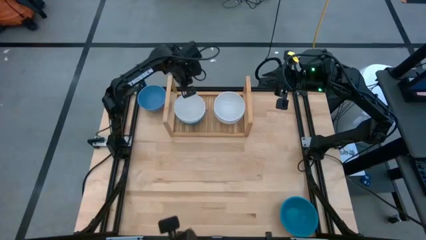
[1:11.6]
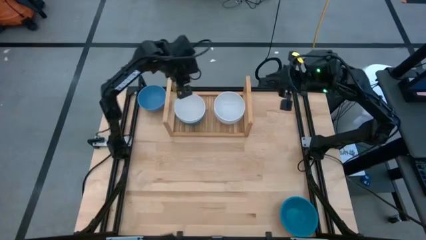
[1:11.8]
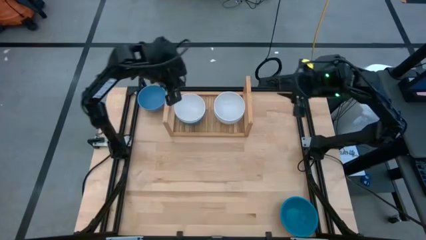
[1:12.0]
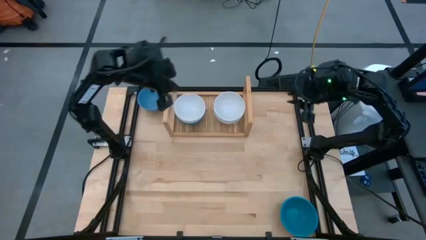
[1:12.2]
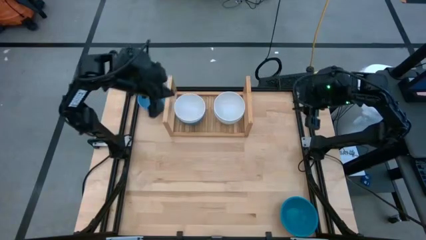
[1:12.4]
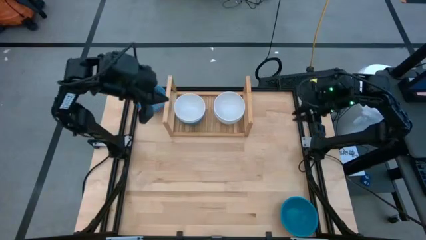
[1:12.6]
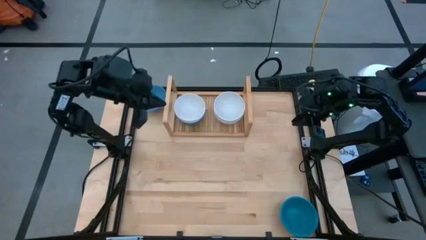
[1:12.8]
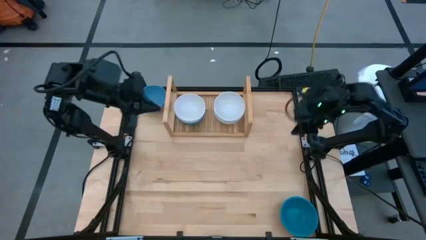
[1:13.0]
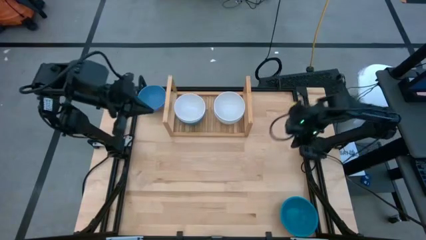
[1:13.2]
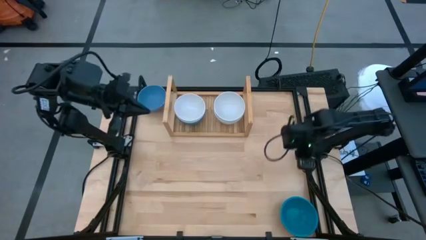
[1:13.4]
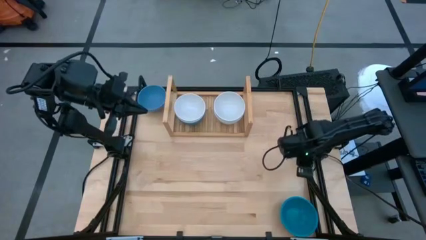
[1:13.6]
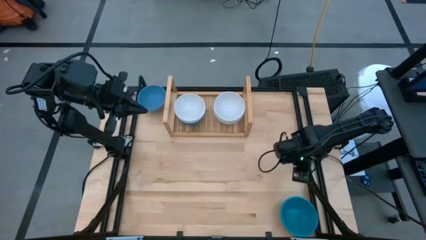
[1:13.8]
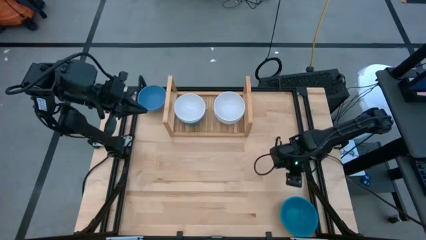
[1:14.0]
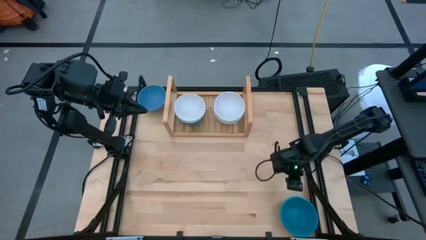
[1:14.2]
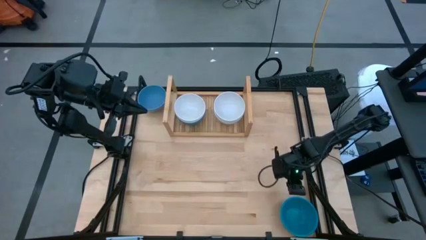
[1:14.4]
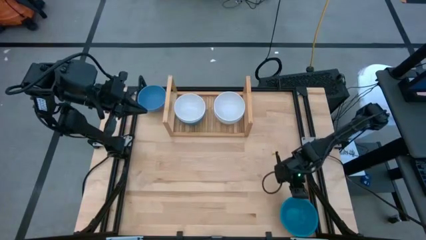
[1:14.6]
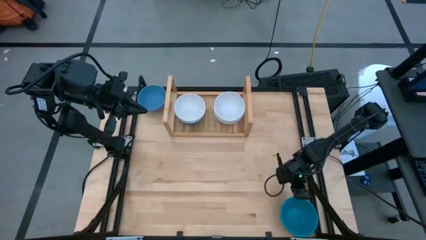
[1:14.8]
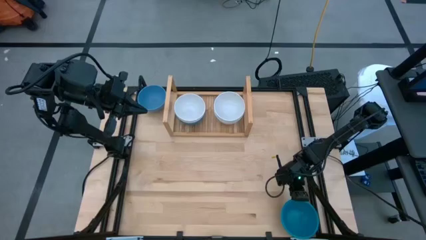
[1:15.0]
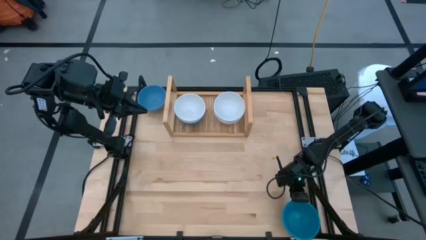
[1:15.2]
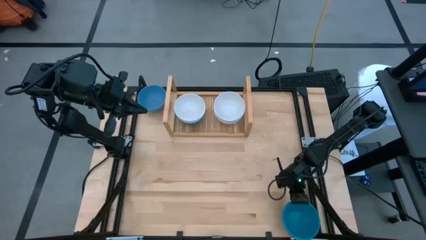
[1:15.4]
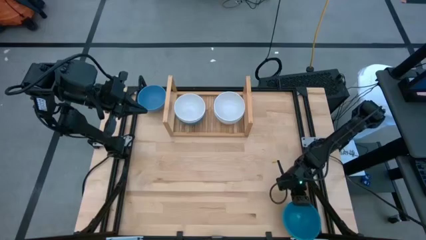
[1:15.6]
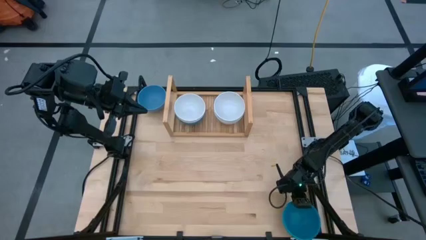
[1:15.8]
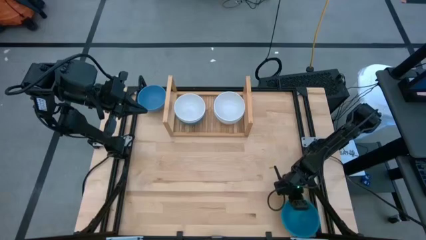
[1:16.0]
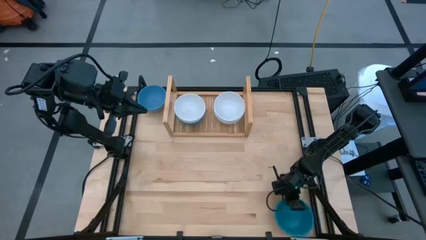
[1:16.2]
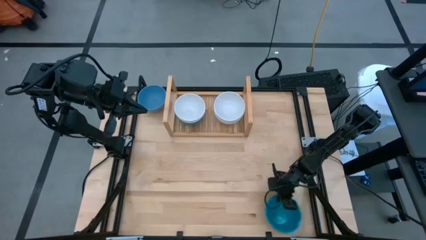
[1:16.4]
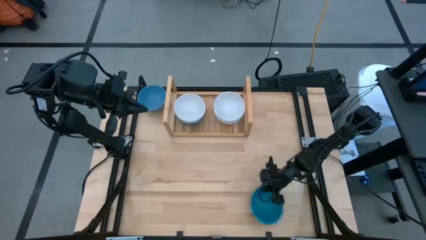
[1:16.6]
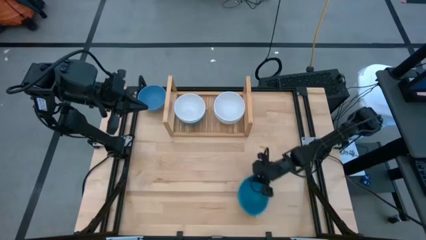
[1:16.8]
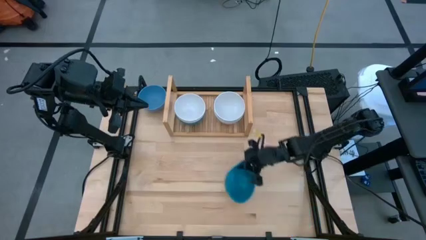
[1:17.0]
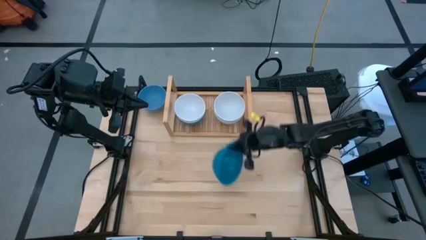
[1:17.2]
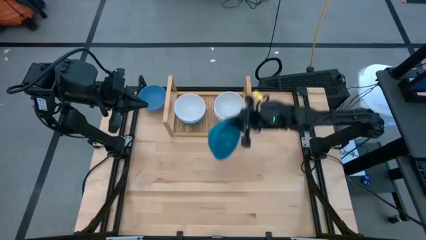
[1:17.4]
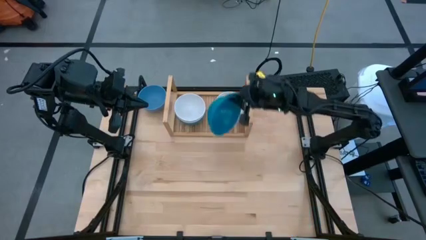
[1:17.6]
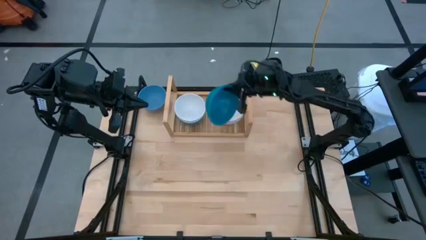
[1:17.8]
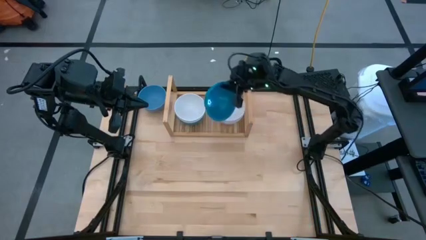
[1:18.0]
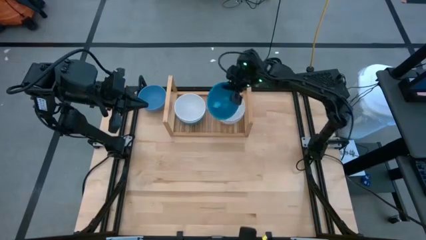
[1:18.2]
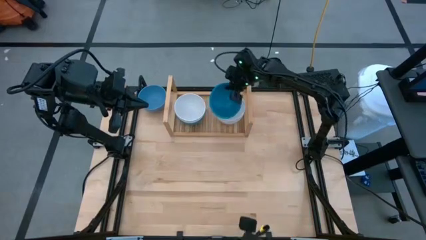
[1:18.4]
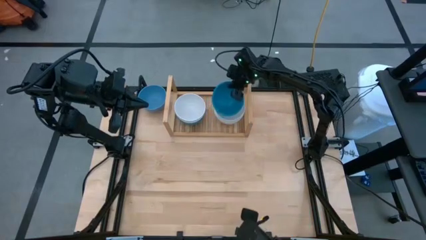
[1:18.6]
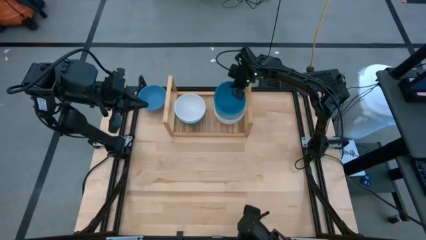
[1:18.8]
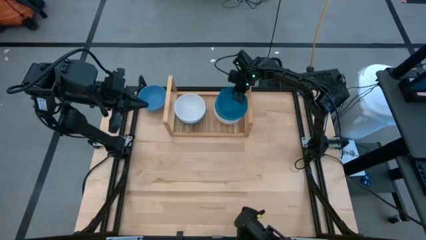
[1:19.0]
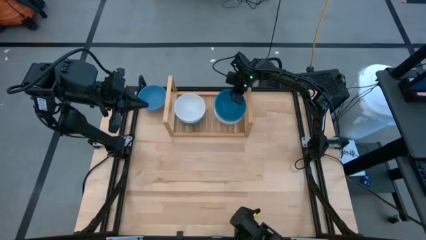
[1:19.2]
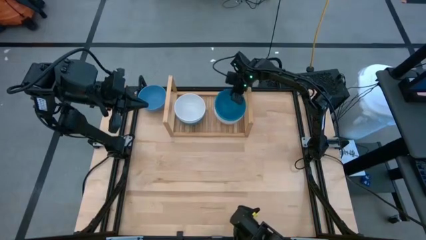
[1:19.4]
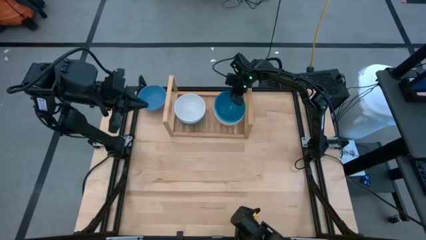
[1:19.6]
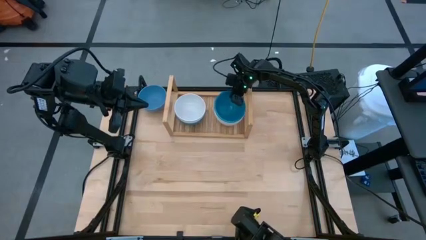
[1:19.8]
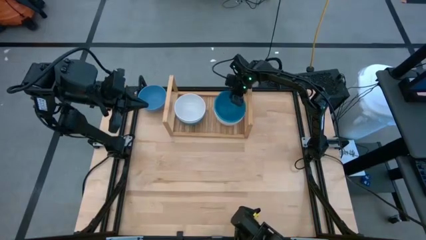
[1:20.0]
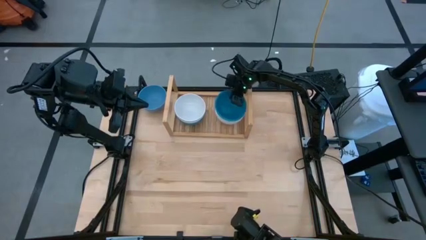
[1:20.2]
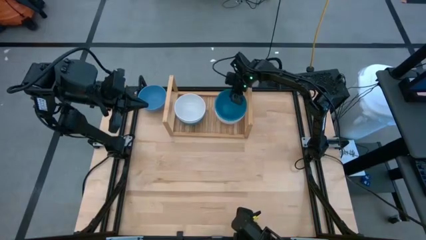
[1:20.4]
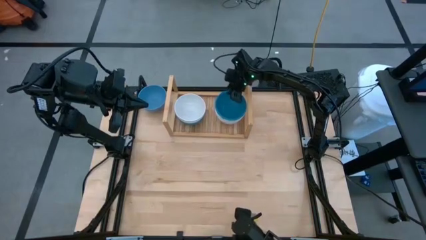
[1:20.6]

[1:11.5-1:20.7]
Task: Place and stack bowls onto a shelf
Stack the bottom blue bowl on top of the white bowl on the shelf

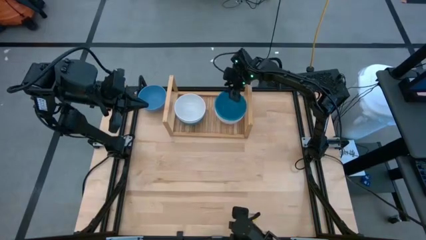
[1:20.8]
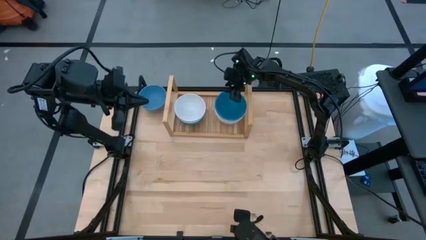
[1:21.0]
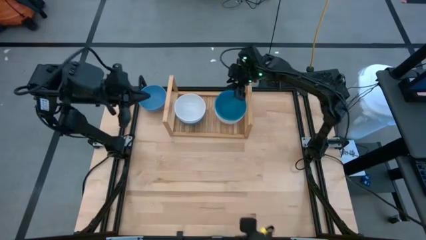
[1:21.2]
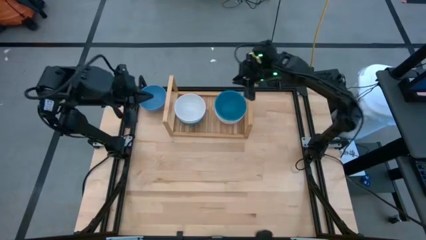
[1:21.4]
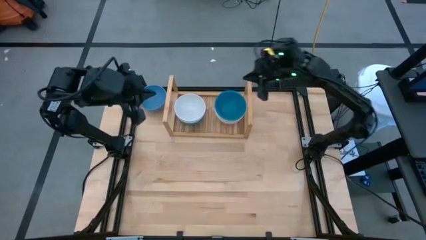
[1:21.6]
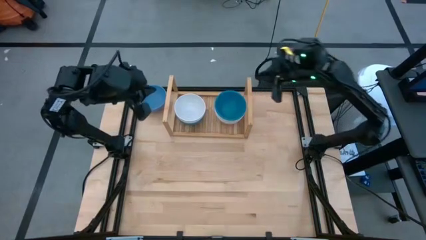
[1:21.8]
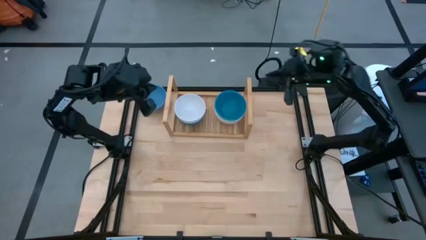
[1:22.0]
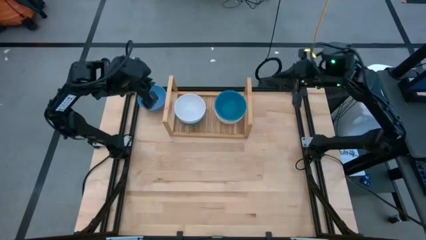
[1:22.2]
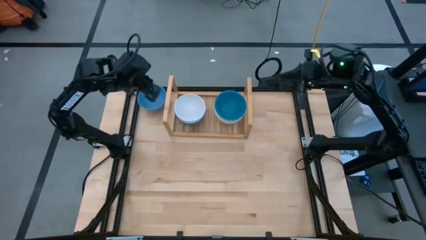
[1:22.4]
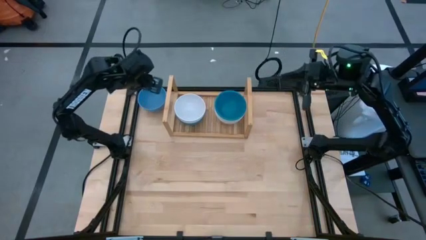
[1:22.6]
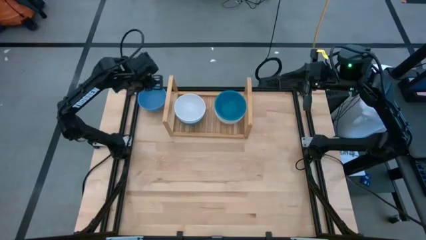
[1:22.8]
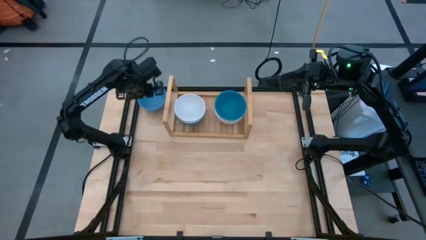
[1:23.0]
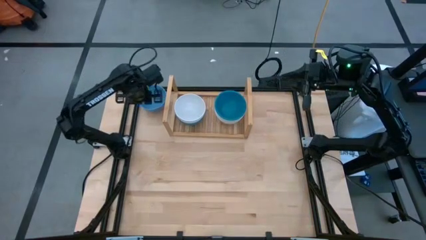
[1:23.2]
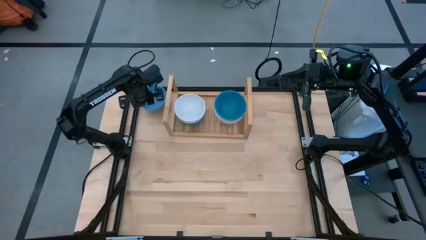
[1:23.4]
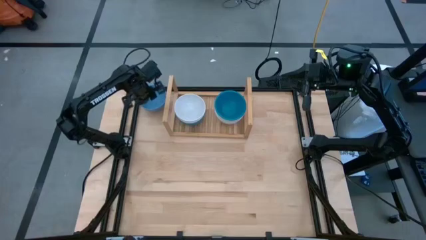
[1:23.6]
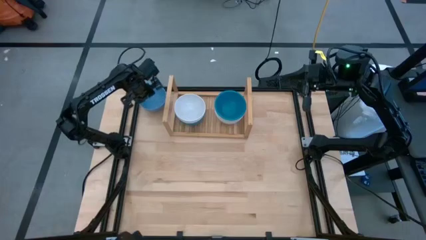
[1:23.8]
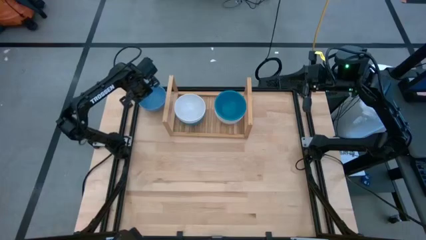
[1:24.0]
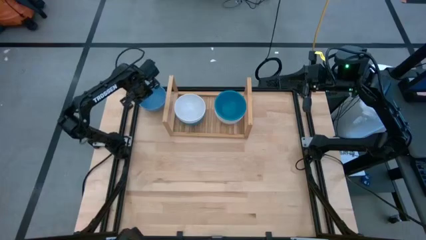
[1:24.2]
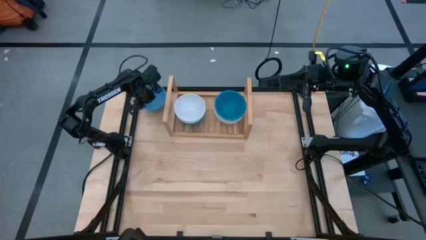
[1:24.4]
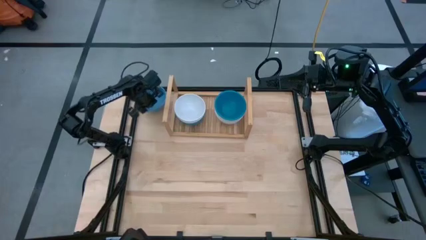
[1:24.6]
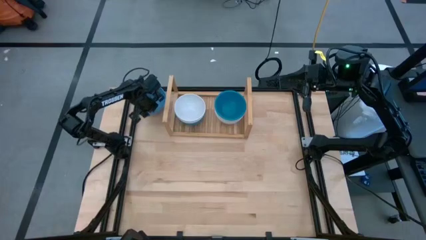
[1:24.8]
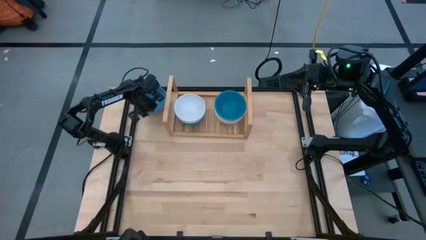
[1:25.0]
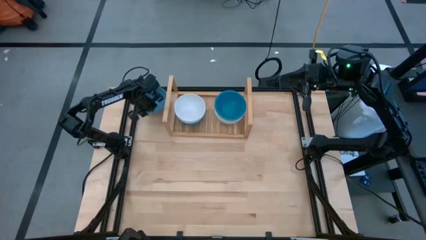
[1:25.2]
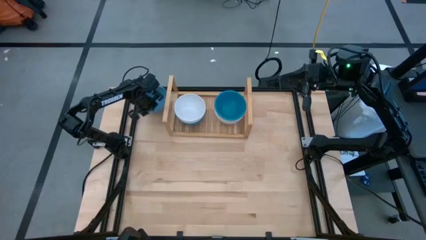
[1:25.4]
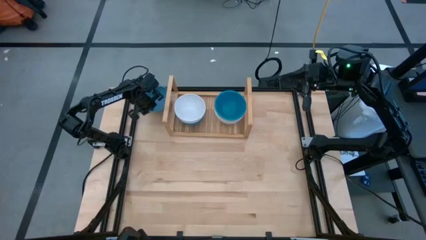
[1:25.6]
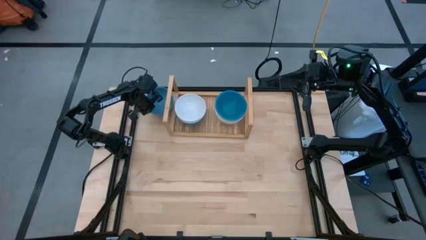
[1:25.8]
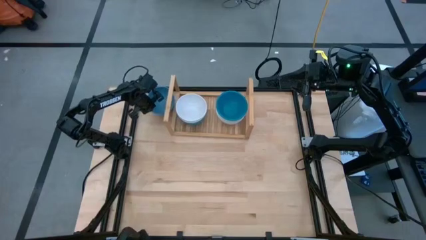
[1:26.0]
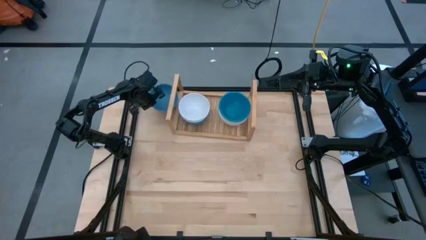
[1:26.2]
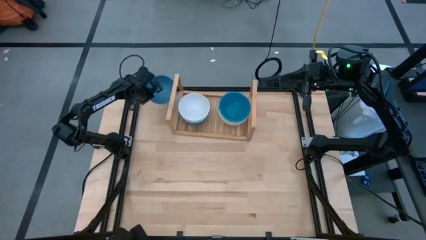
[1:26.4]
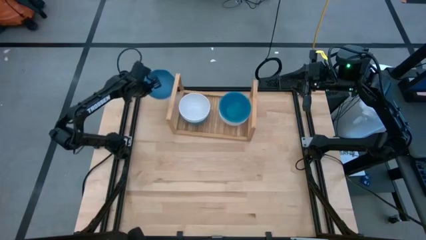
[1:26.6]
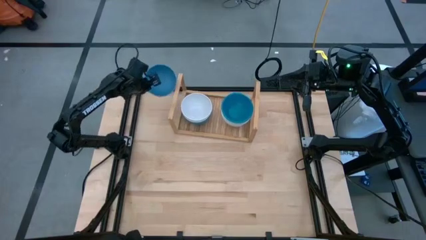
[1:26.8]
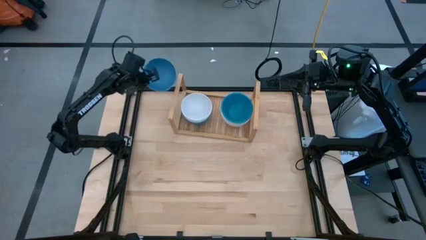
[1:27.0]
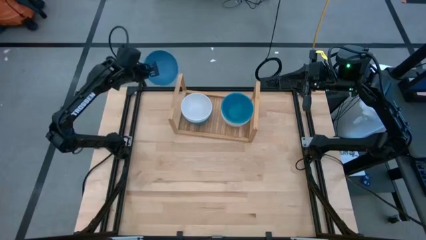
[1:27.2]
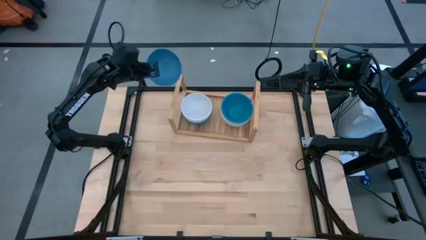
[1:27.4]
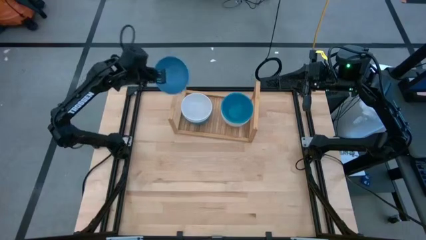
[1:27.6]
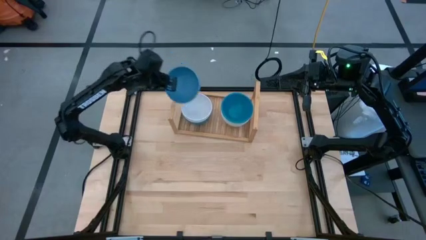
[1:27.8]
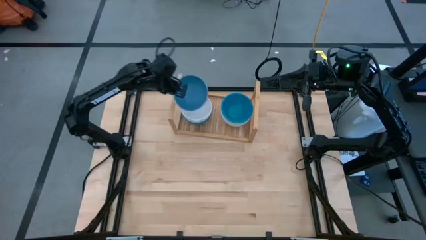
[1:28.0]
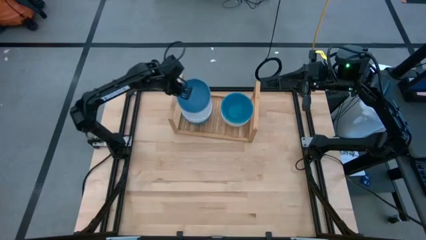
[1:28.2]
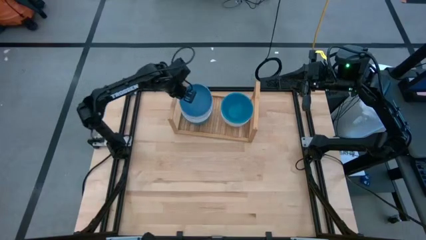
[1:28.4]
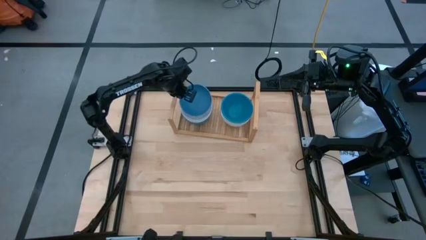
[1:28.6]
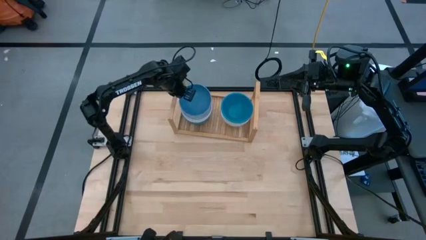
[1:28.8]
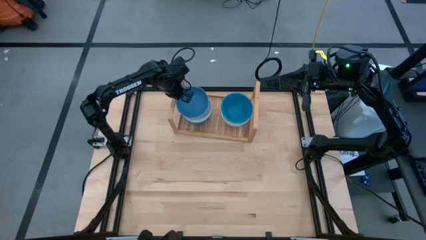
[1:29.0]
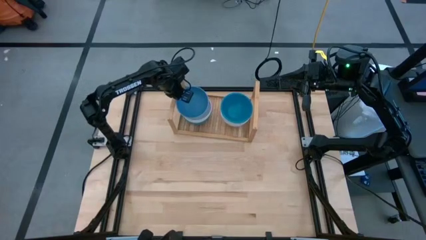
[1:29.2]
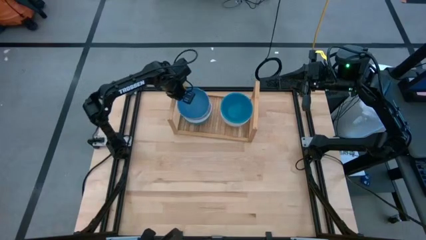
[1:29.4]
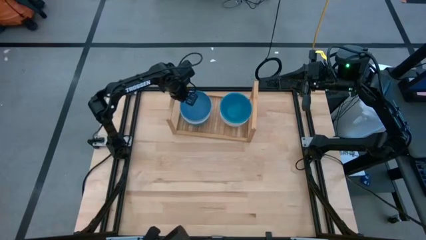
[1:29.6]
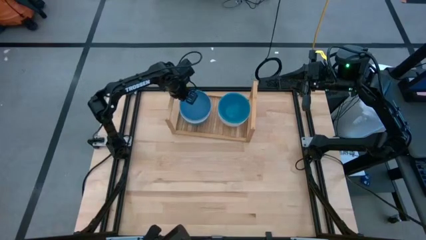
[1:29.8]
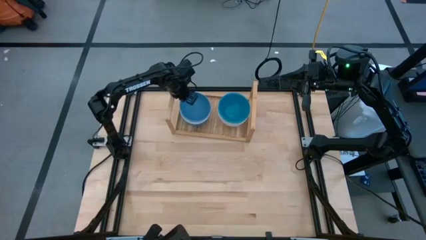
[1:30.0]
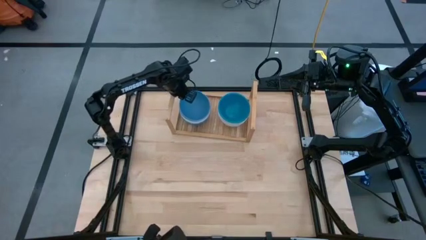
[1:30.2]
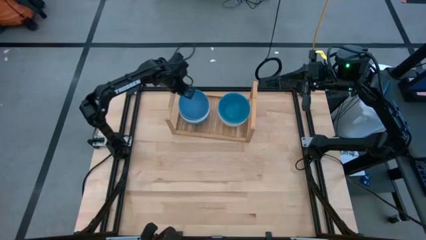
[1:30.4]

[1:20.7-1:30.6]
Stack the blue bowl on top of the white bowl on the shelf
